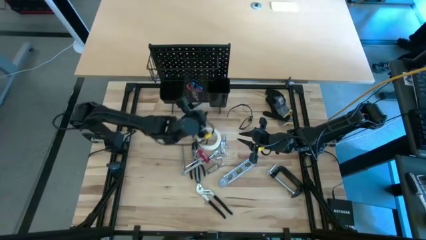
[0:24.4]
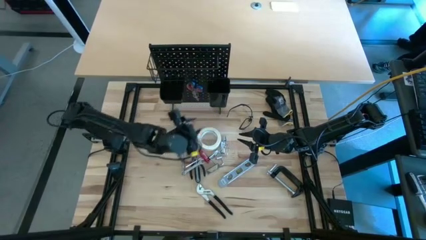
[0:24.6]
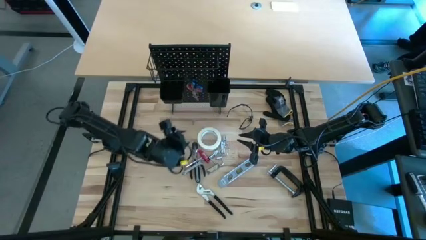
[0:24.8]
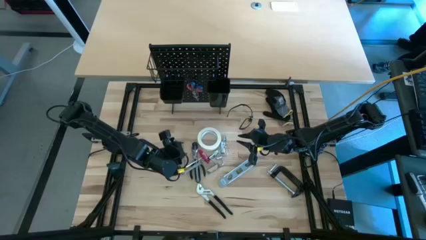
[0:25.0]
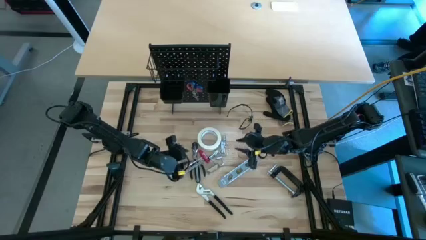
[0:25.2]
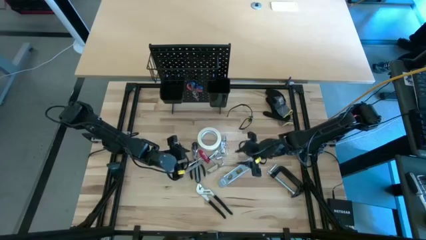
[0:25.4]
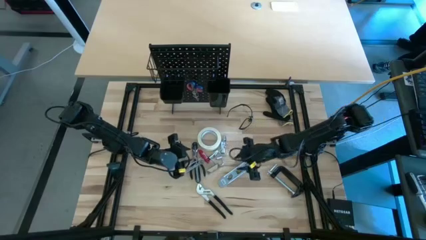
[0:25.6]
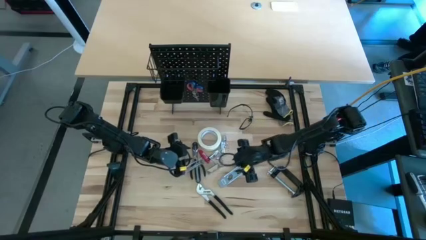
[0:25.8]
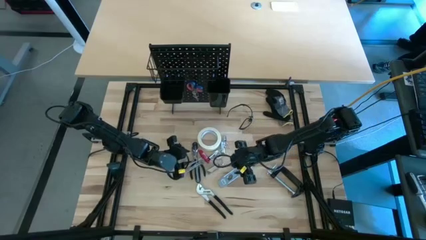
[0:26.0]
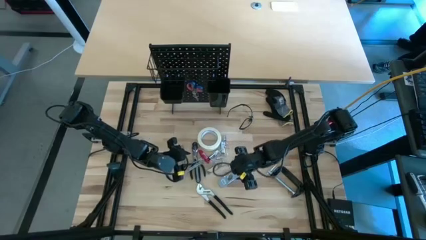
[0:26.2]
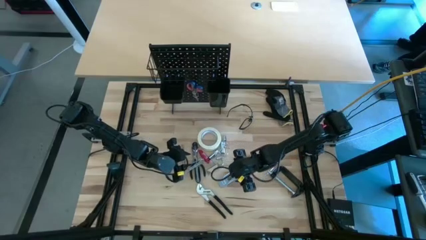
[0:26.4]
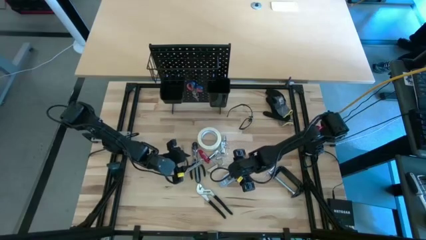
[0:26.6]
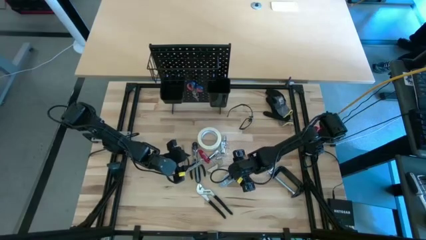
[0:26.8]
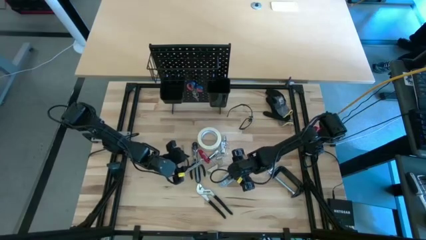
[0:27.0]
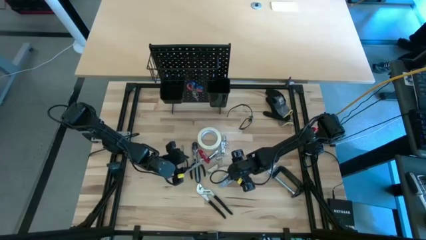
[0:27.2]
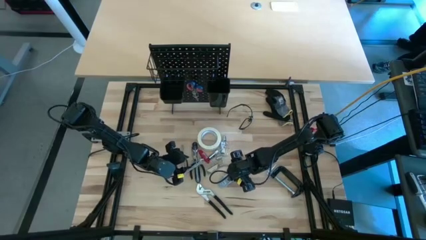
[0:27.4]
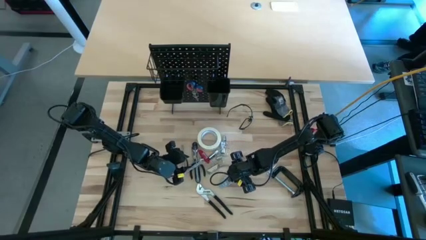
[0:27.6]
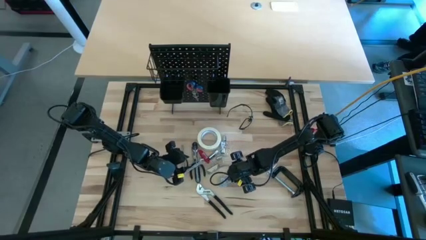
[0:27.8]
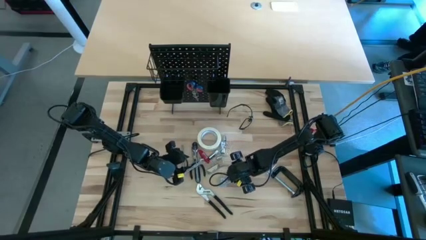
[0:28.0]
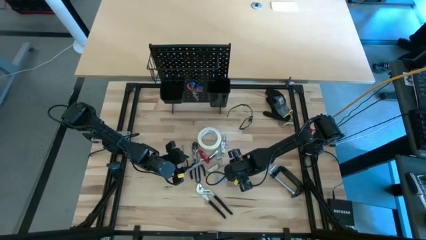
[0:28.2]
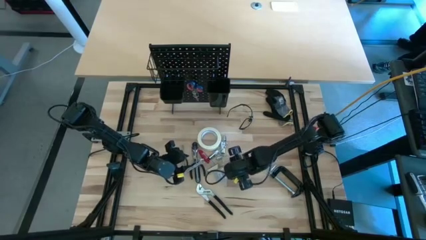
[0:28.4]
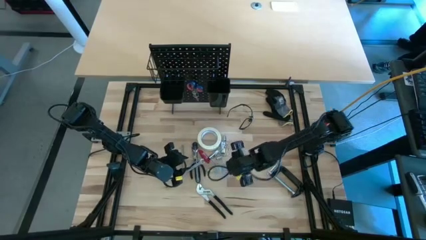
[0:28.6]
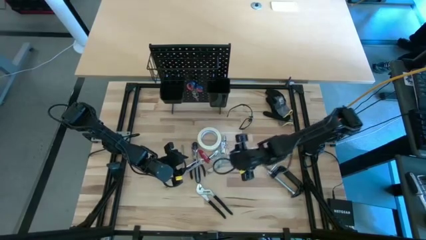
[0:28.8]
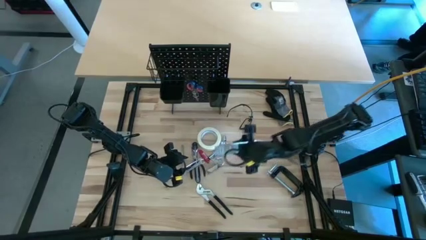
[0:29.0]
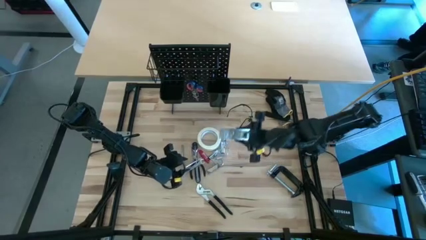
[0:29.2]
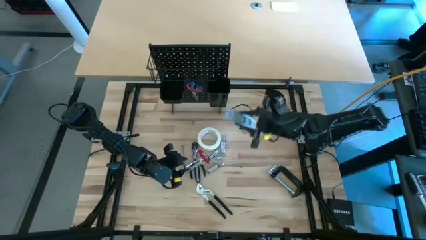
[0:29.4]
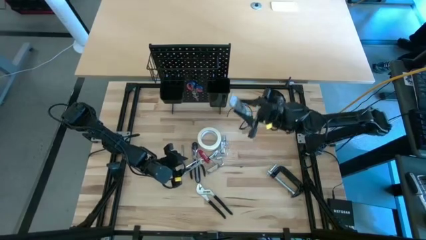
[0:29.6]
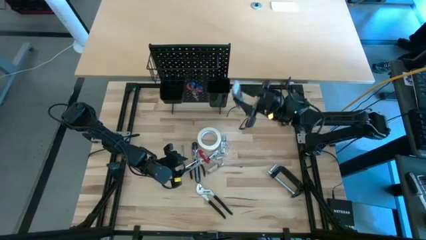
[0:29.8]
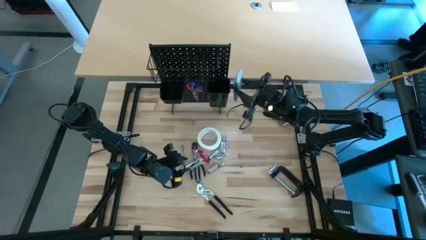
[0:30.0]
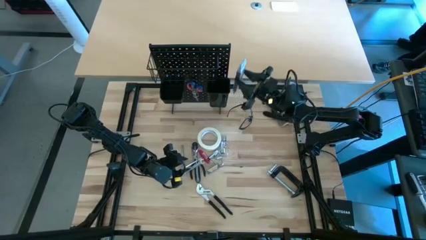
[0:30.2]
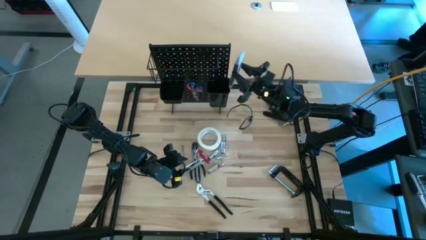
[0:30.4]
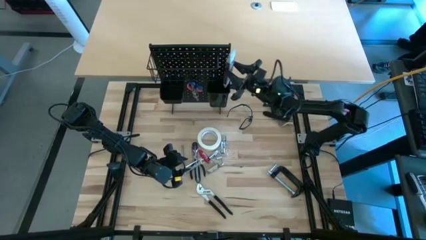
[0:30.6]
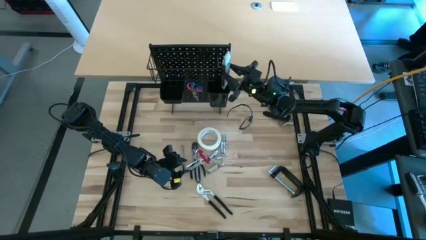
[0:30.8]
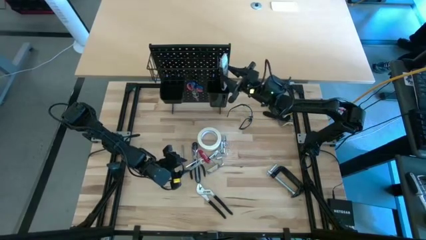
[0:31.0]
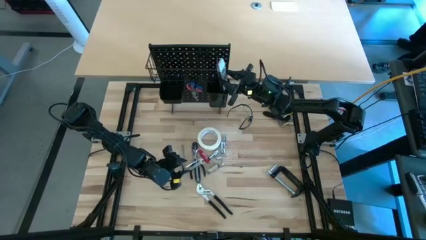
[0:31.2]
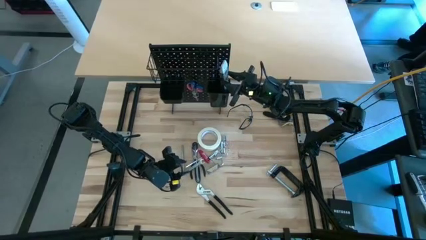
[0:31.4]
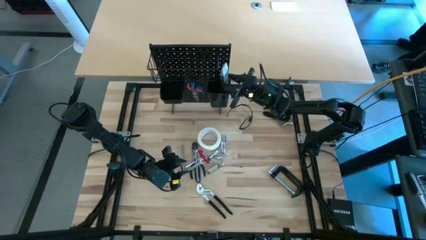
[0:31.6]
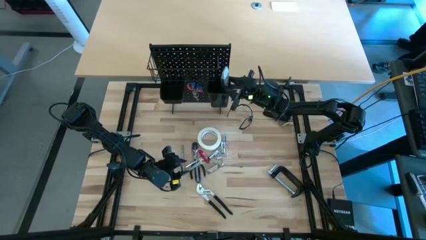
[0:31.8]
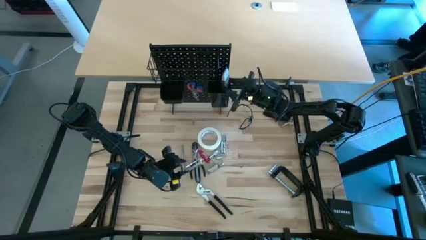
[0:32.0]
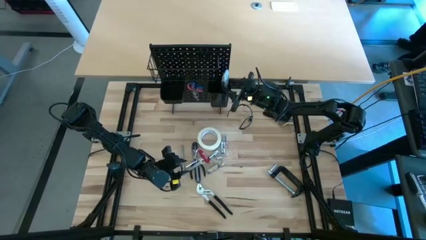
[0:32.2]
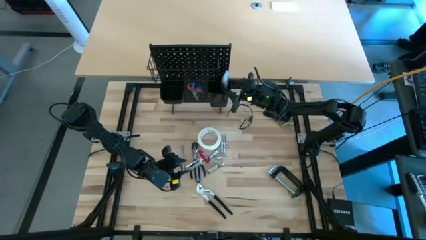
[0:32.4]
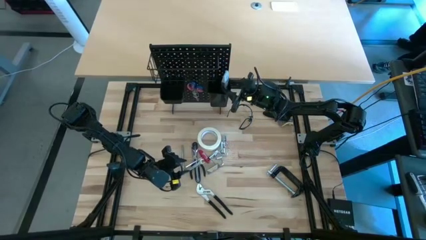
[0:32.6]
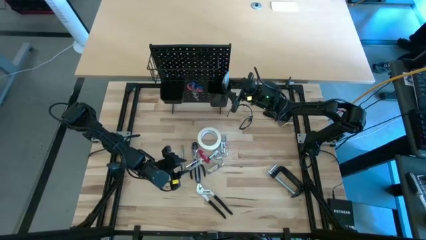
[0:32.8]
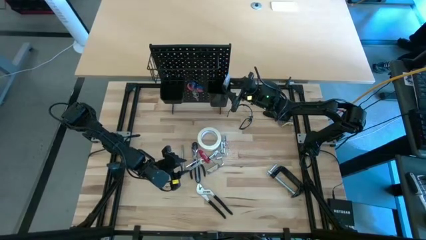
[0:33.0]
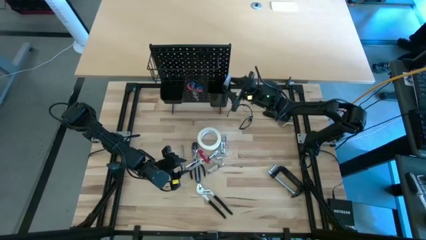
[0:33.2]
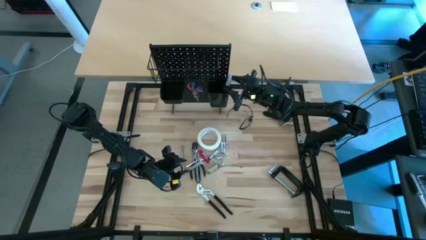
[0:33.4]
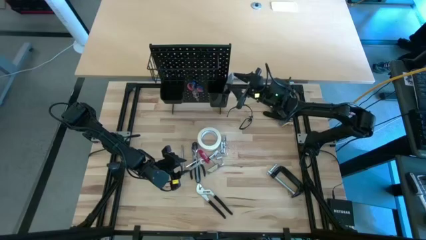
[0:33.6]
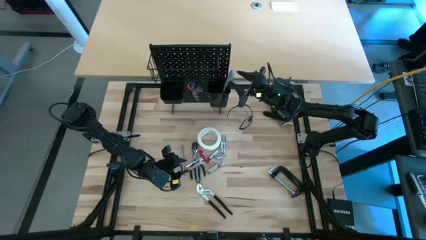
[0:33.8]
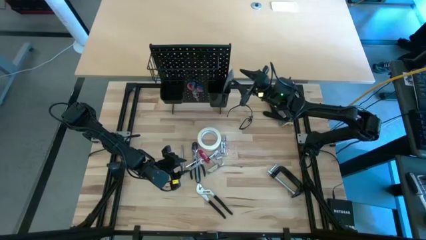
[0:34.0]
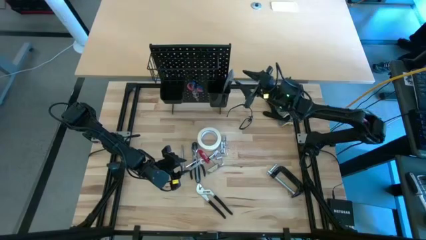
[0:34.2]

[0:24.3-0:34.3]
Task: Hang tools onto peg board
Put the gray spirit level into the right black bin on the peg board

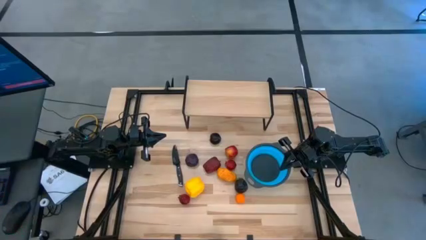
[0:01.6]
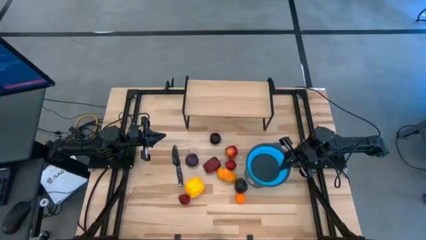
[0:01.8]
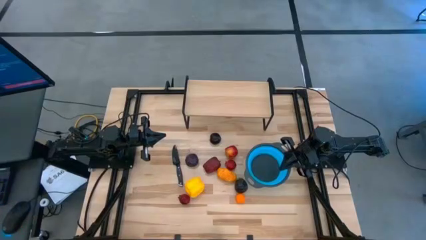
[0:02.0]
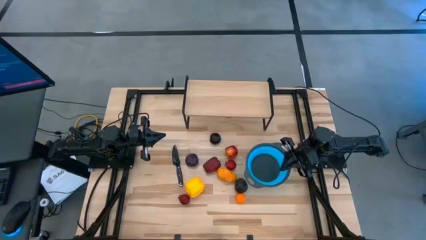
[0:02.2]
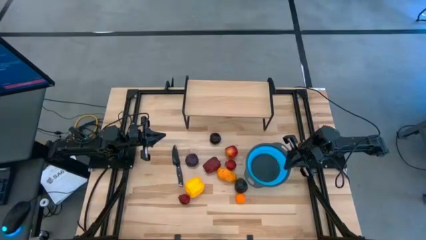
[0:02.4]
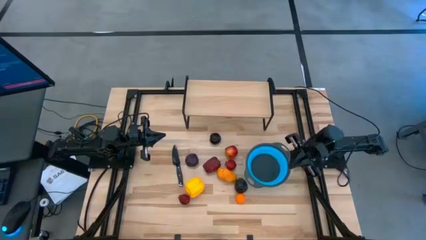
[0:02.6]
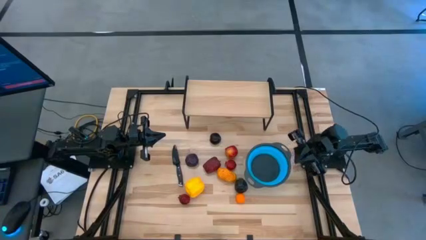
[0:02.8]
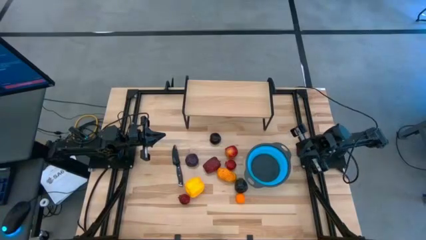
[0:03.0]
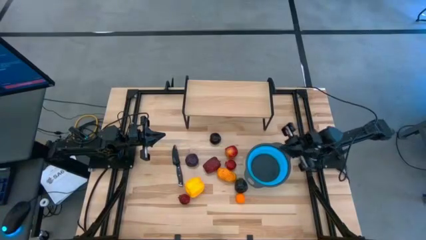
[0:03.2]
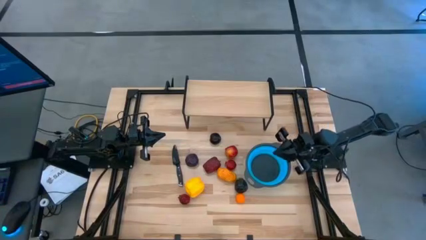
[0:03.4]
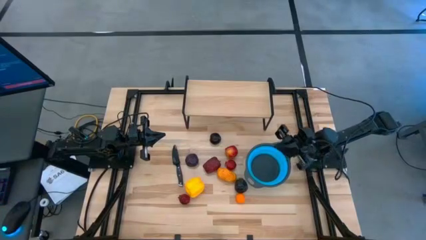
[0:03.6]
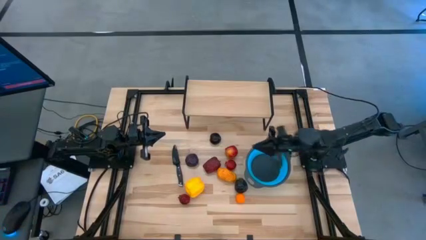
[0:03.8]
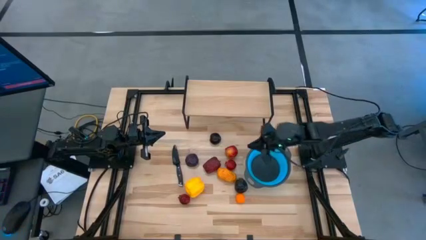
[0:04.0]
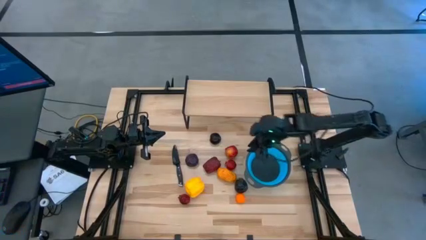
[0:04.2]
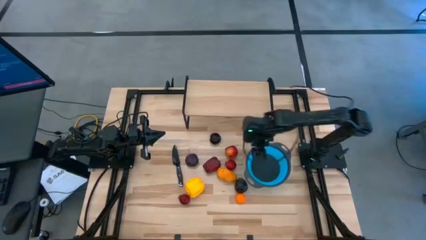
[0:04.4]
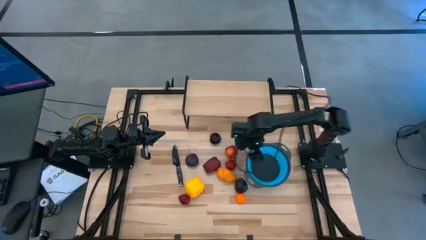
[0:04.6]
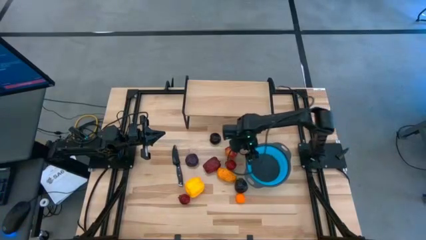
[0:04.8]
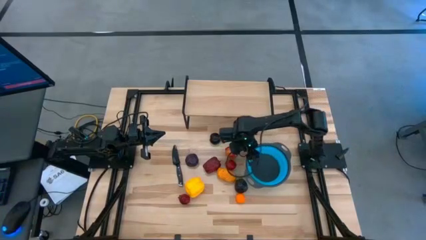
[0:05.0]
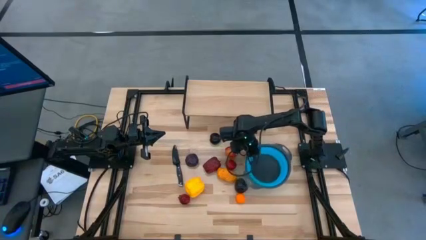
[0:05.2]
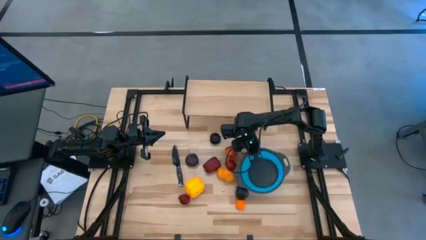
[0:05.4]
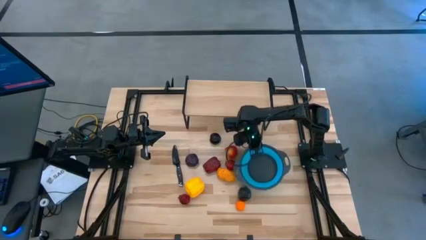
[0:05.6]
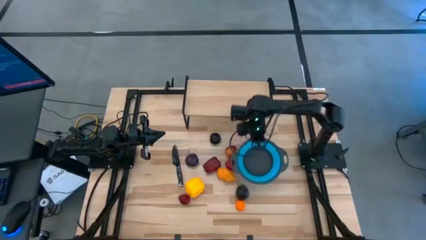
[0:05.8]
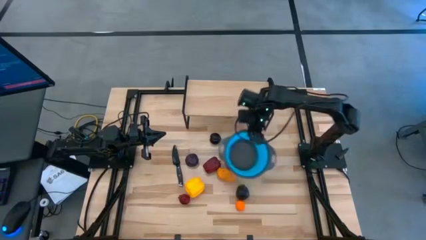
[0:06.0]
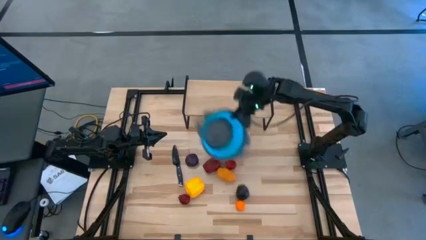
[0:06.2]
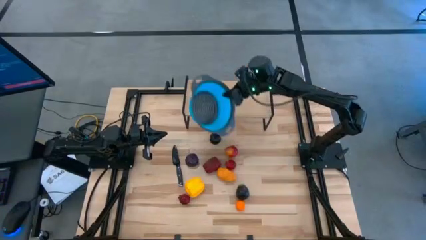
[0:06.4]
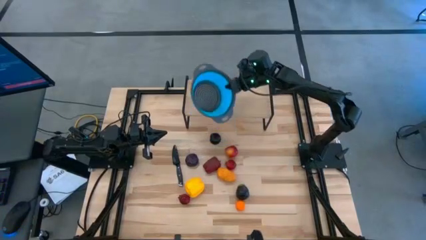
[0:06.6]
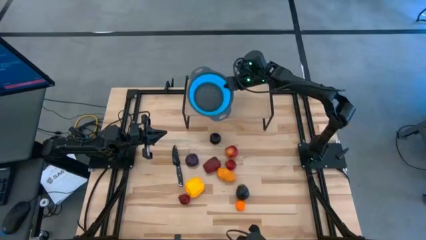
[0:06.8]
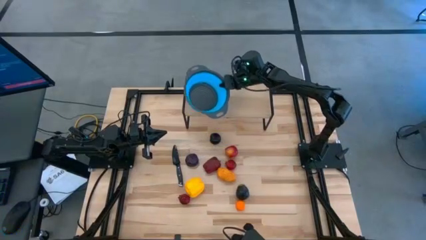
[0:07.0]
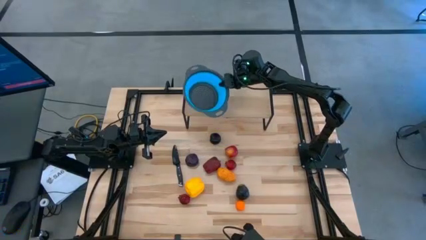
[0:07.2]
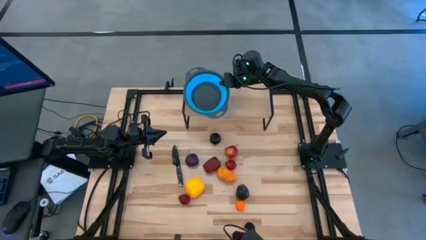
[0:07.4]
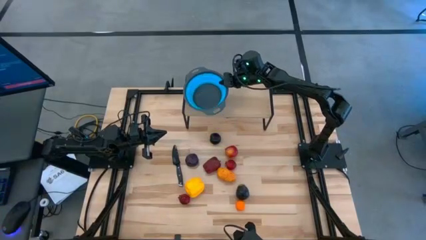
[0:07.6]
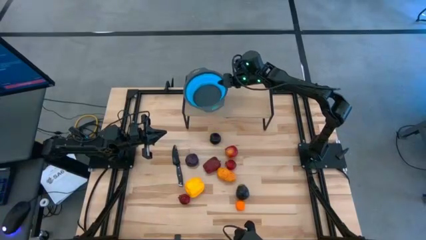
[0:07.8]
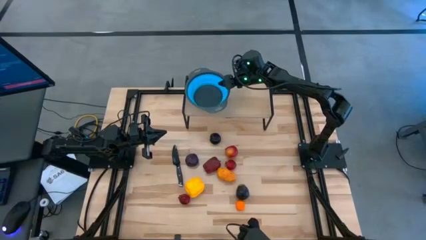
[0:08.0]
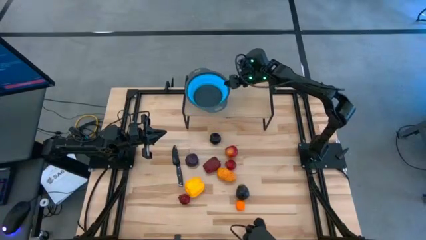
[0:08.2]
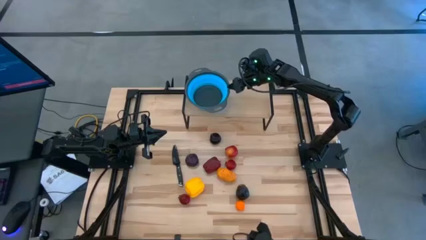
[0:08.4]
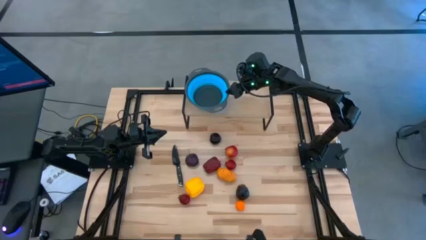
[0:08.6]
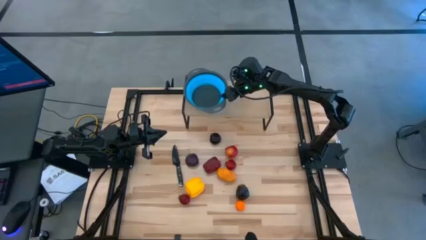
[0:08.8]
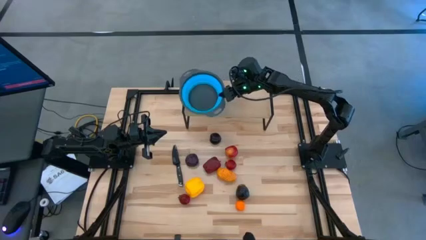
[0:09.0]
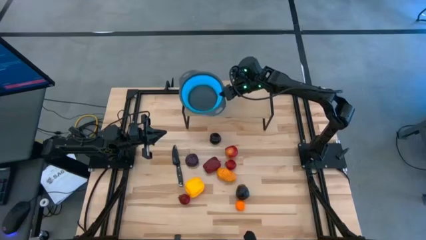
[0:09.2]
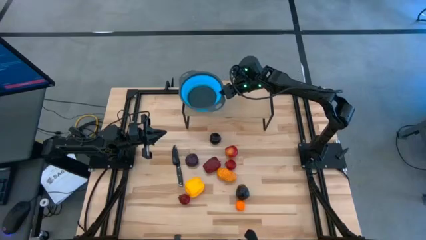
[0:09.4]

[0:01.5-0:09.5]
Task: Pick & Place Fruit
Put the blue strainer bowl on the shelf
